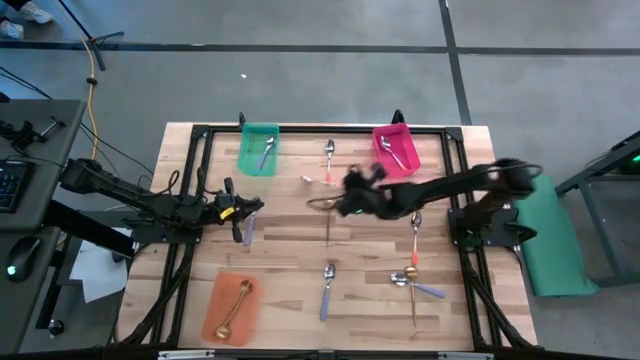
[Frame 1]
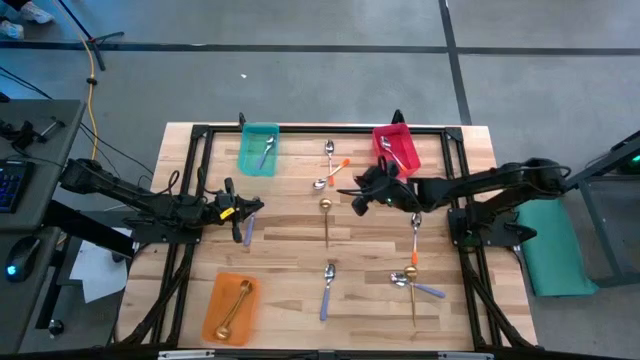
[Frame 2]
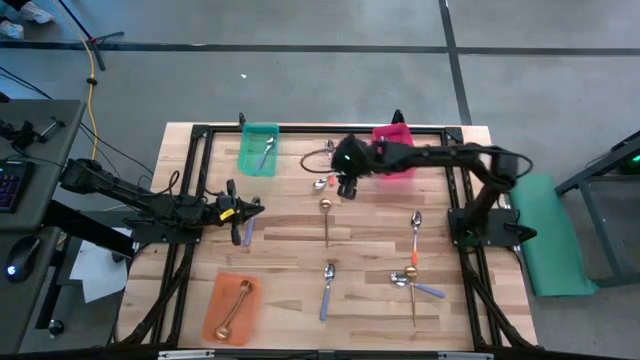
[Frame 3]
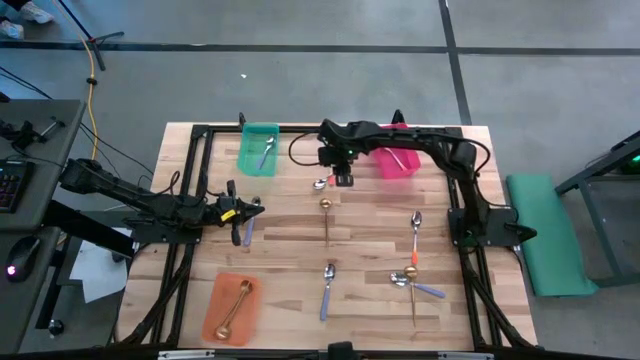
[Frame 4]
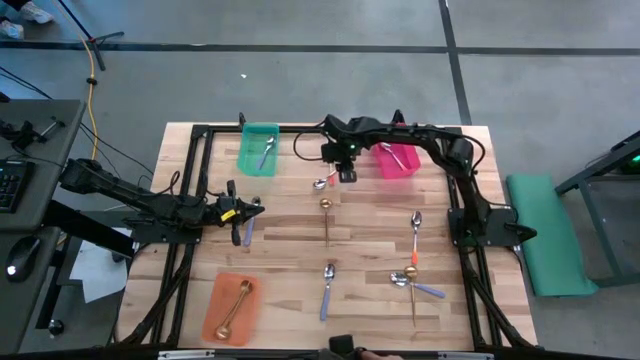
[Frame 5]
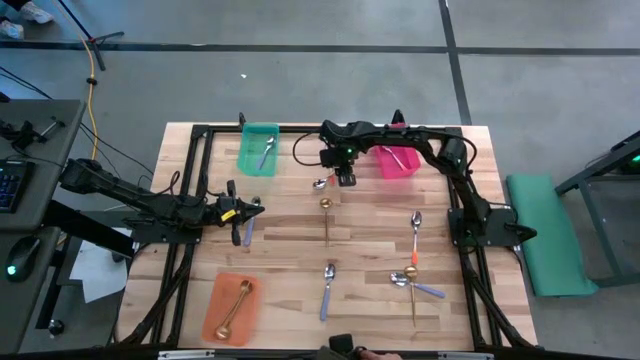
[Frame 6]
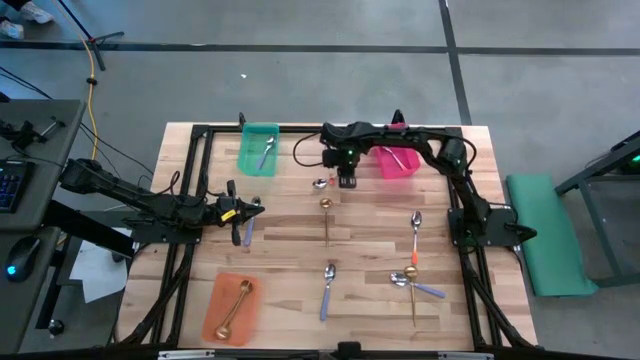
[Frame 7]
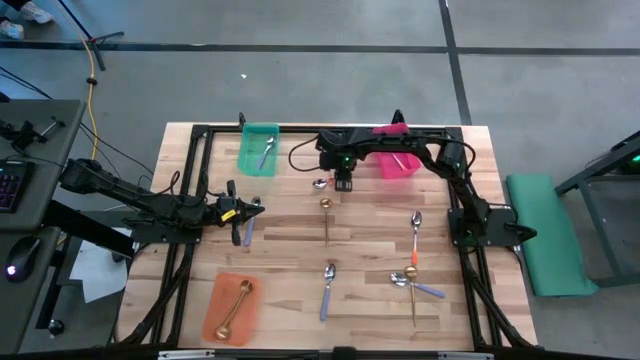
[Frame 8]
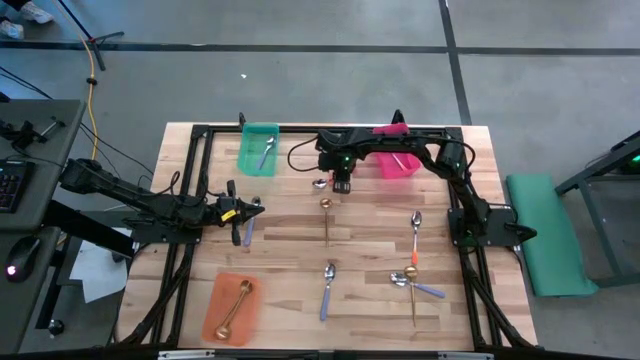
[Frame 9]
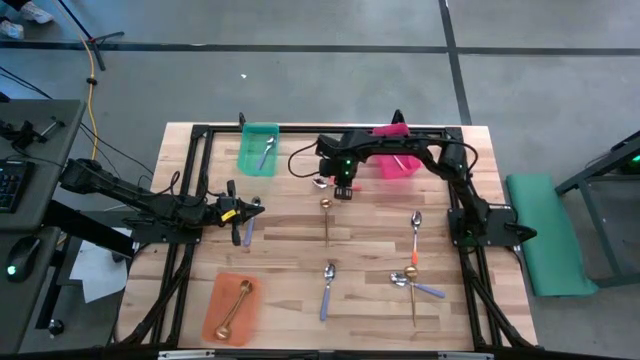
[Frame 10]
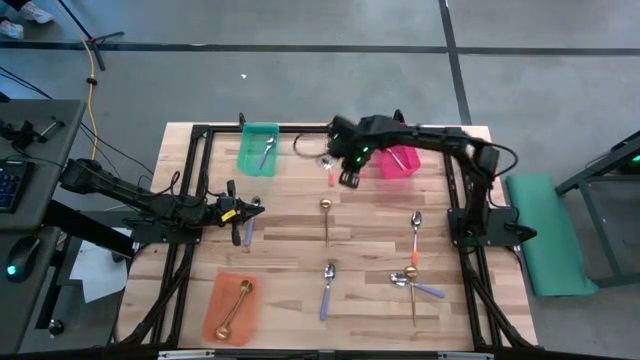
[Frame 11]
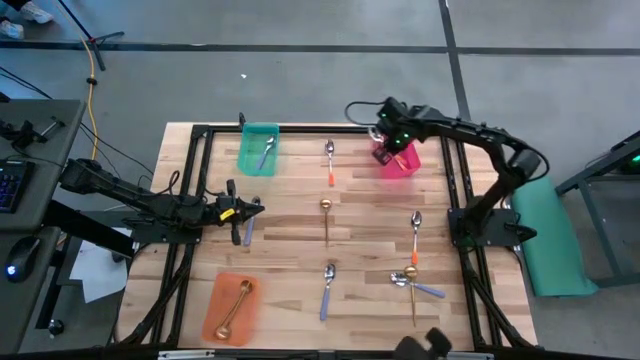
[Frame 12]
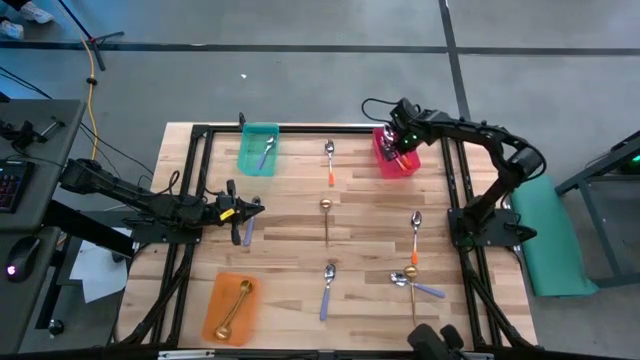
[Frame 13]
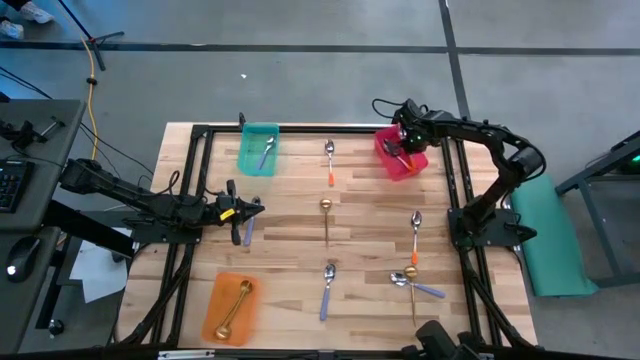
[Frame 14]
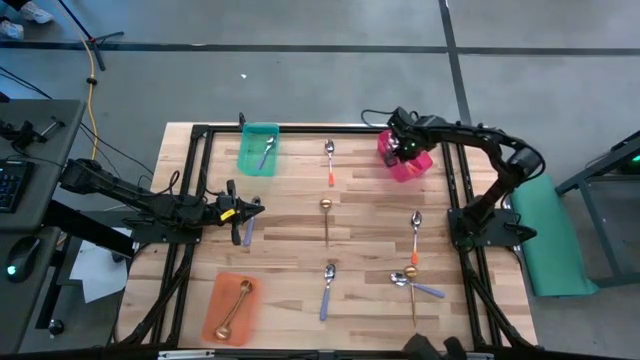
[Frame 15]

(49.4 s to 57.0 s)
Task: Sort silverware by color (type)
Put the orange spoon into the pink bin

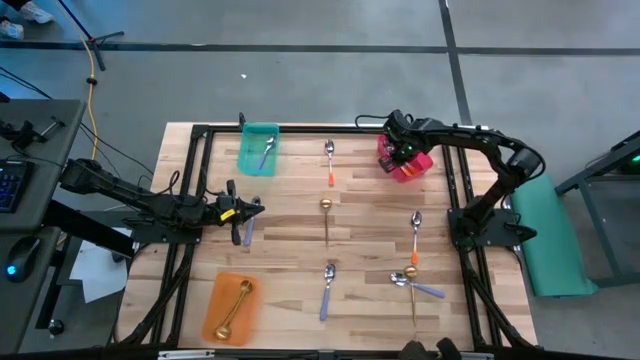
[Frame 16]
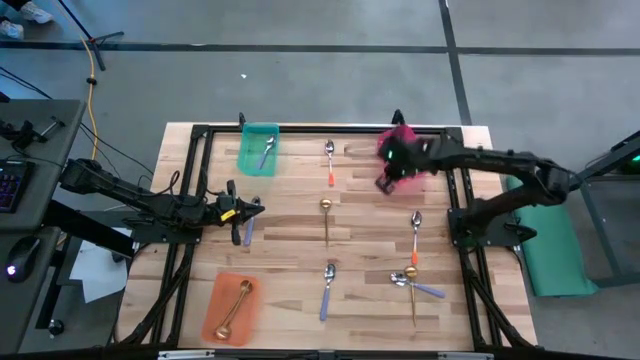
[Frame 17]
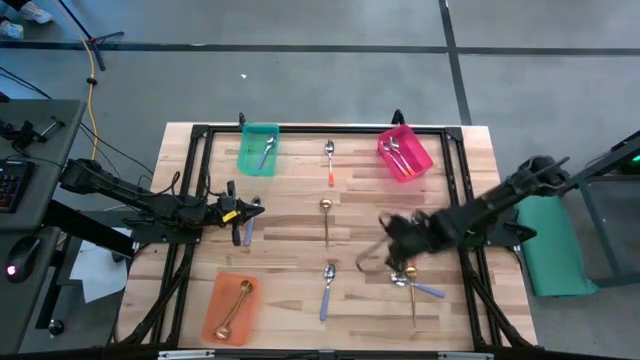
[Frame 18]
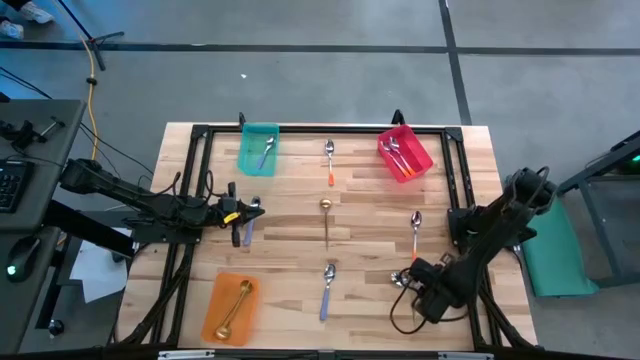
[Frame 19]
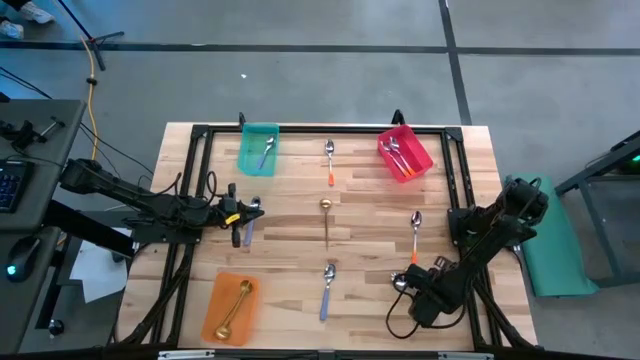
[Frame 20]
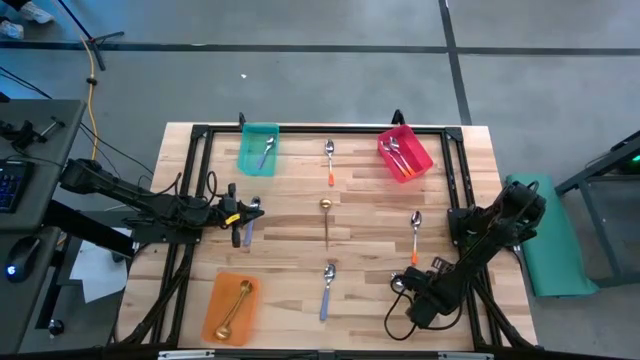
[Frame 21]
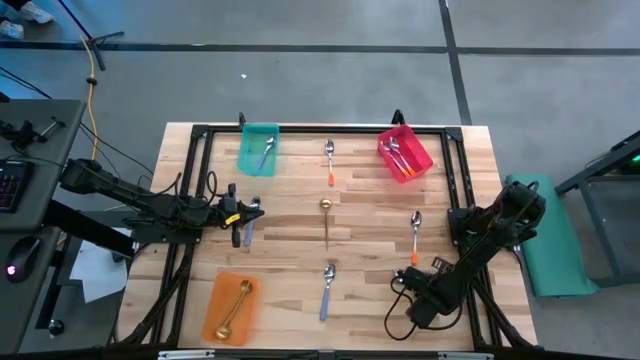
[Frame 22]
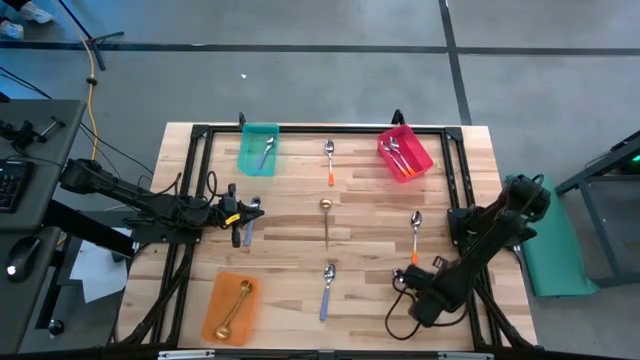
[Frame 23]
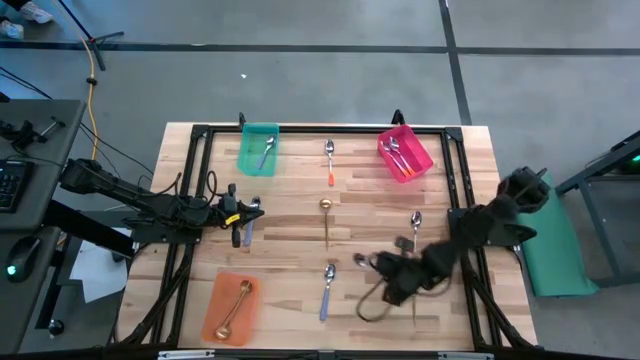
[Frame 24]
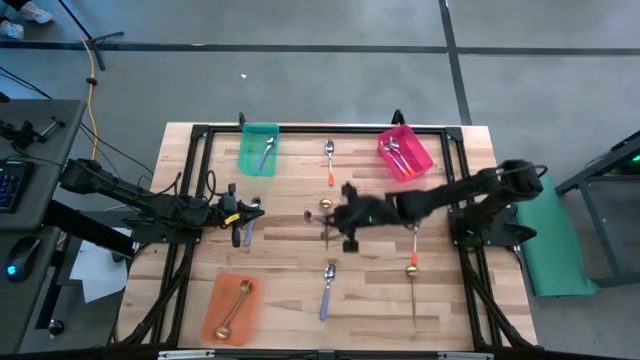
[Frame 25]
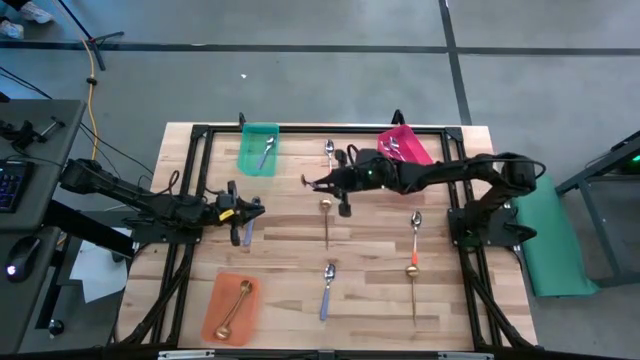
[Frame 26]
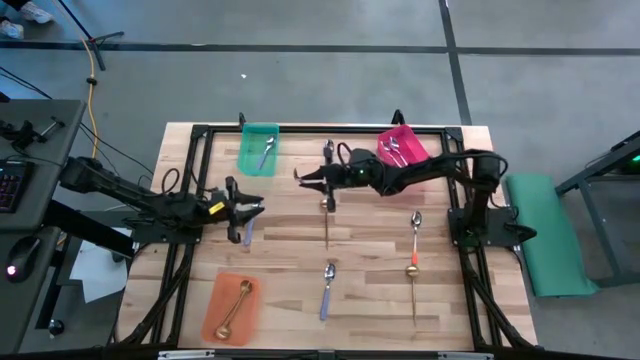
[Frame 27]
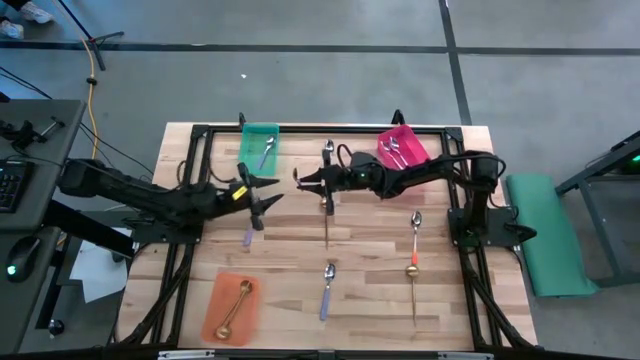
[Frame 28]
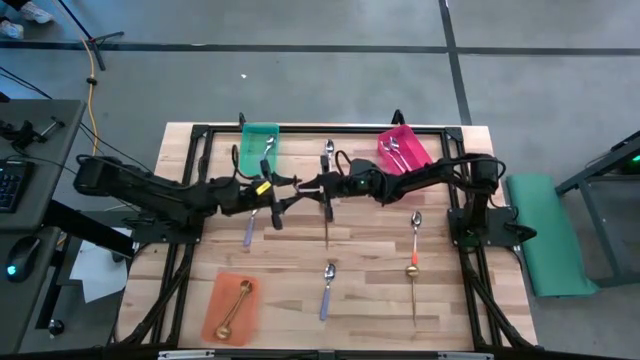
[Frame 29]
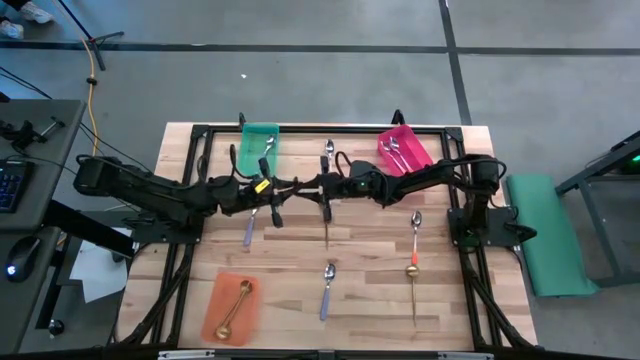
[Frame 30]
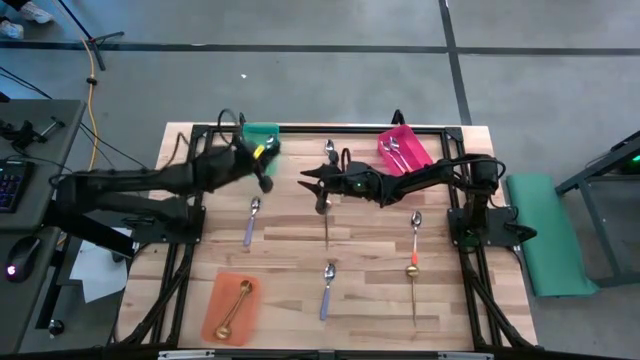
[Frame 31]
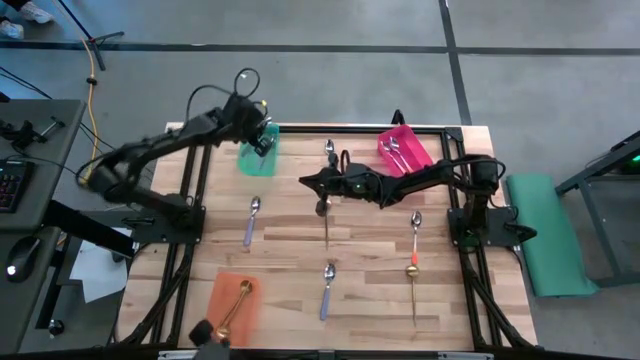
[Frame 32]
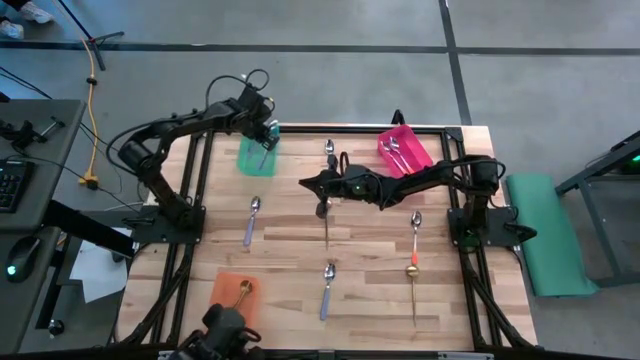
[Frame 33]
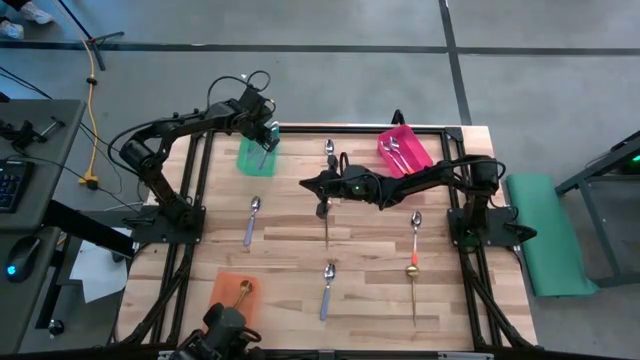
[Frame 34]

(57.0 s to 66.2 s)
Put the purple spoon into the blue bin

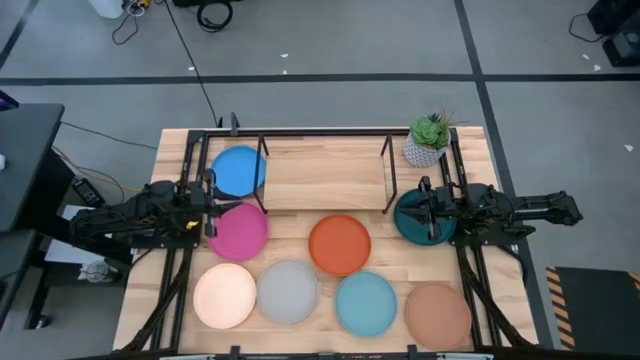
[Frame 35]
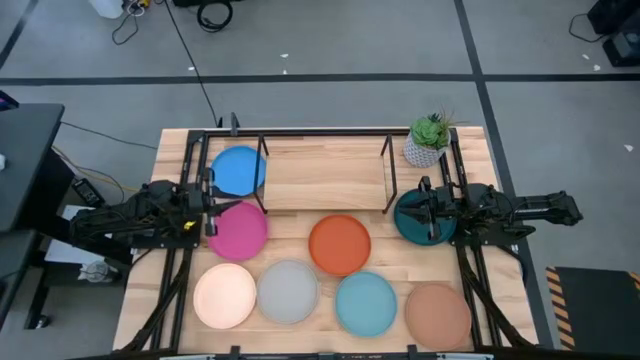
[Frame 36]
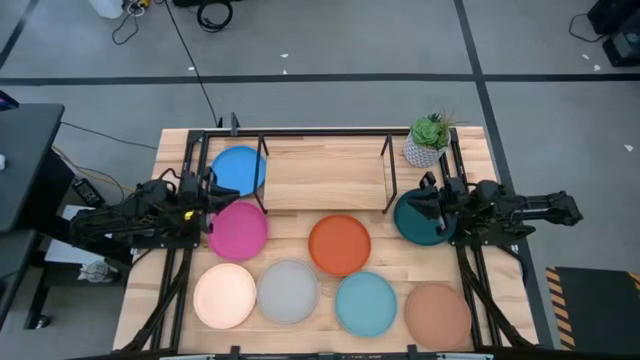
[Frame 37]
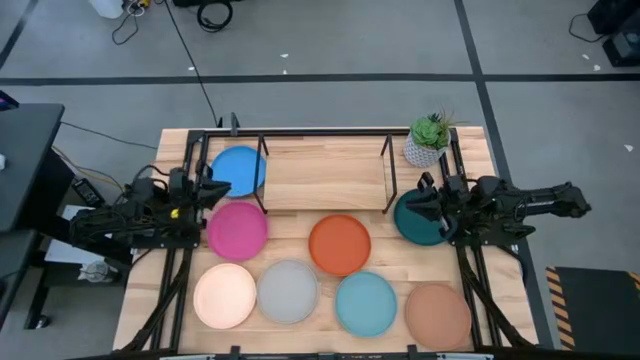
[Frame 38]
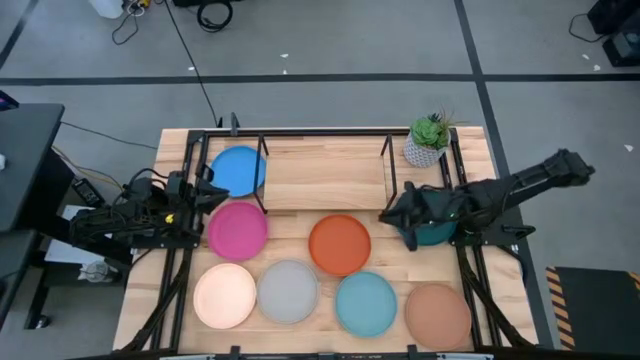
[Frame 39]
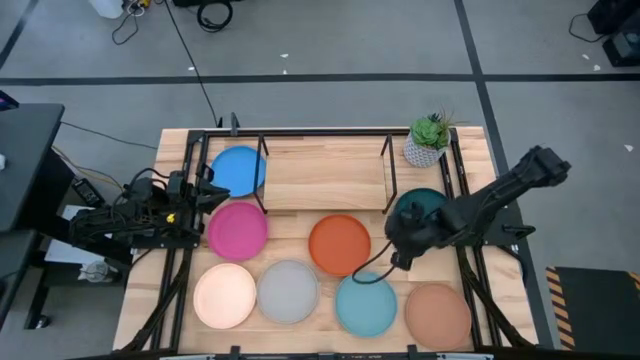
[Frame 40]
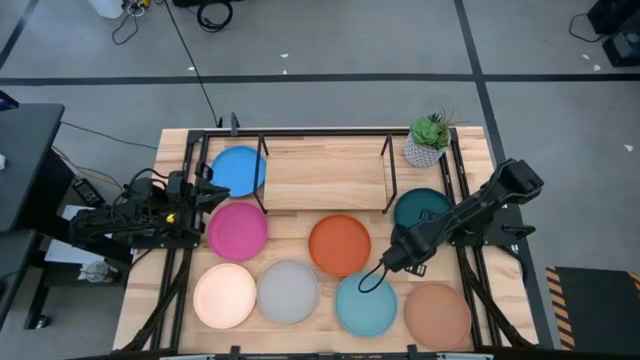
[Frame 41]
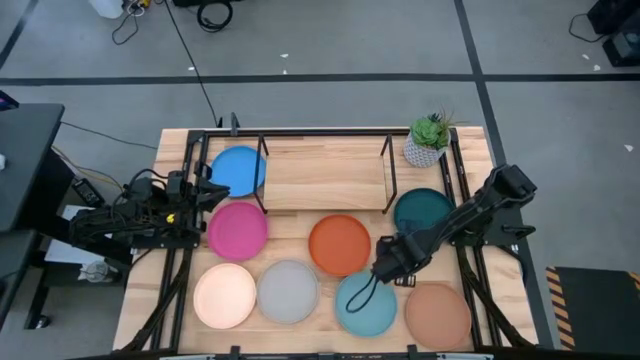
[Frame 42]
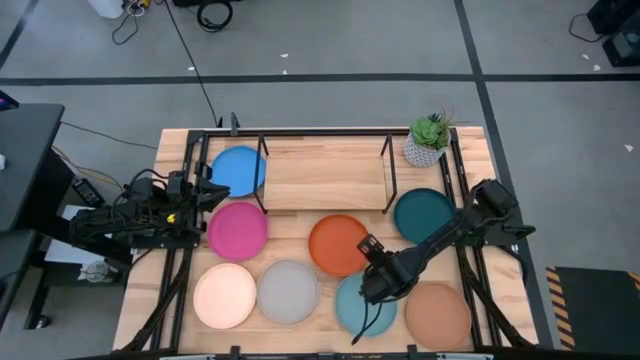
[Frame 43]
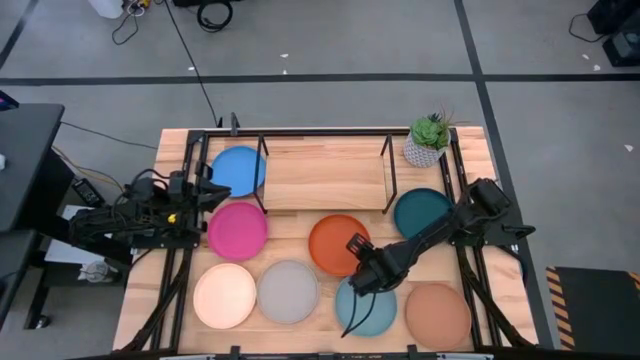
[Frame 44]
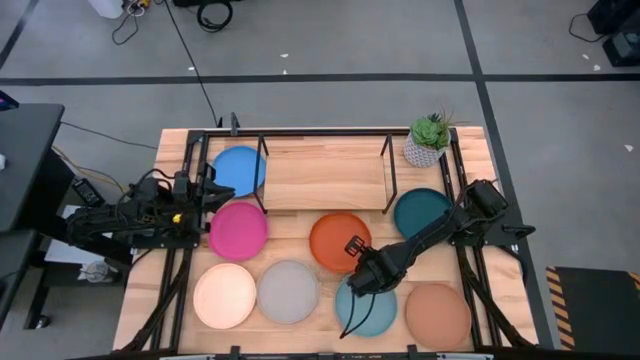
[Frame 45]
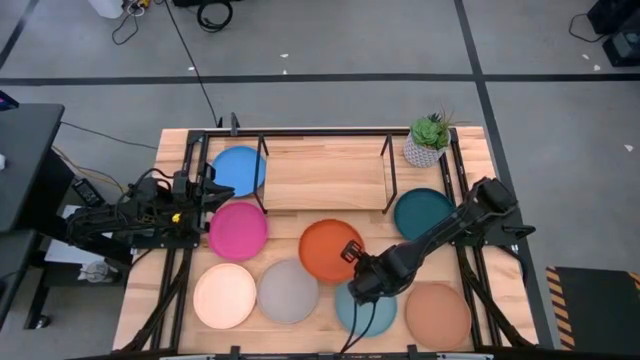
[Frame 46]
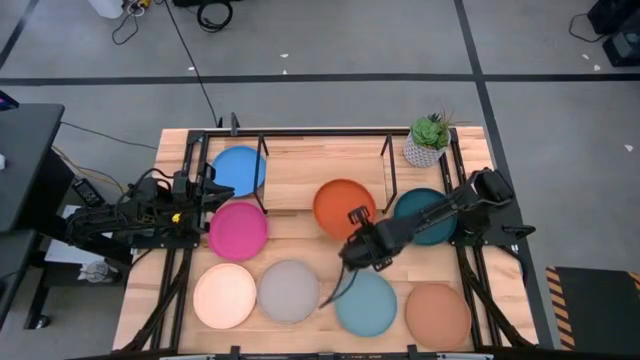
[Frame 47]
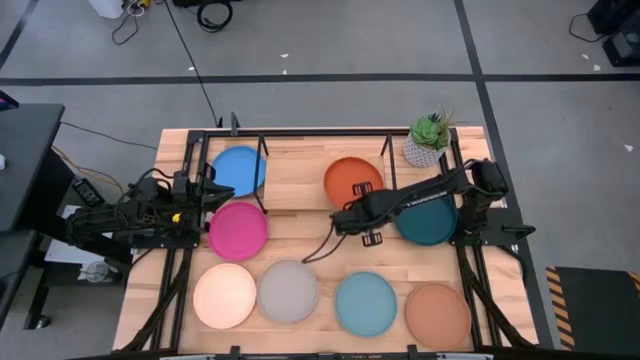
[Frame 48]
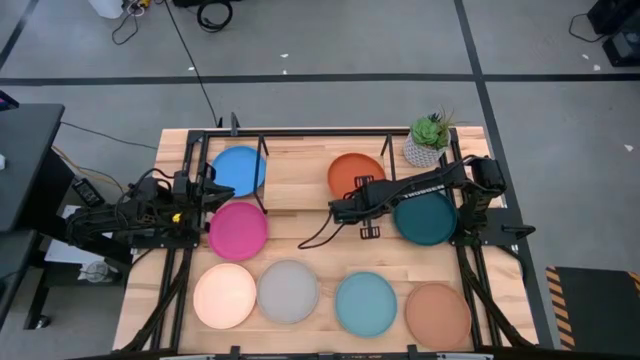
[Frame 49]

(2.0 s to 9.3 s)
Task: Place and stack plates onto a shelf
Put the orange plate on the shelf
